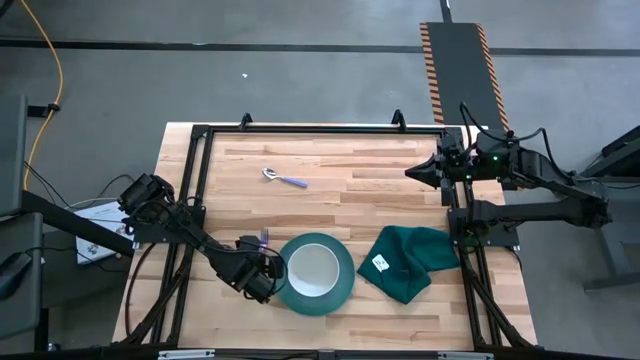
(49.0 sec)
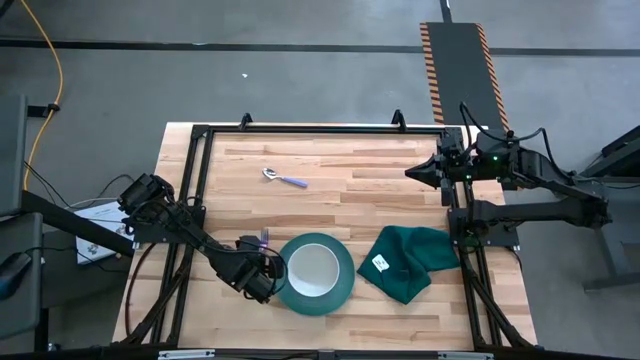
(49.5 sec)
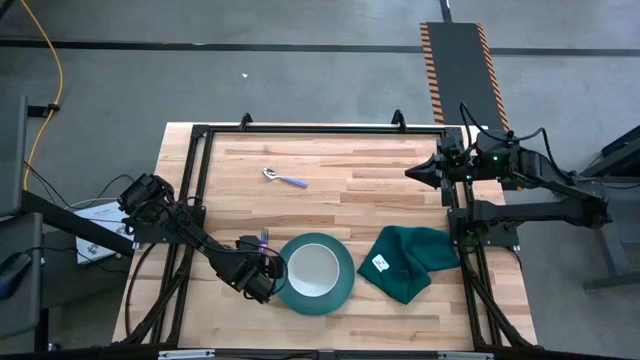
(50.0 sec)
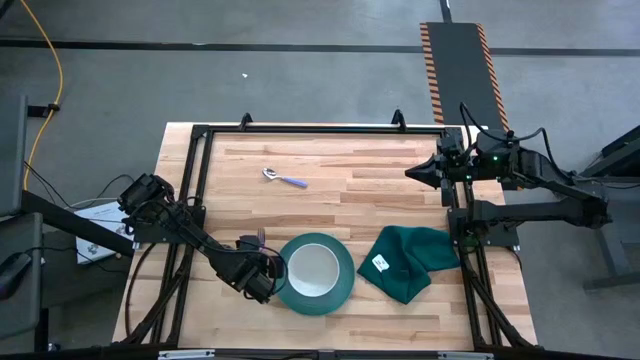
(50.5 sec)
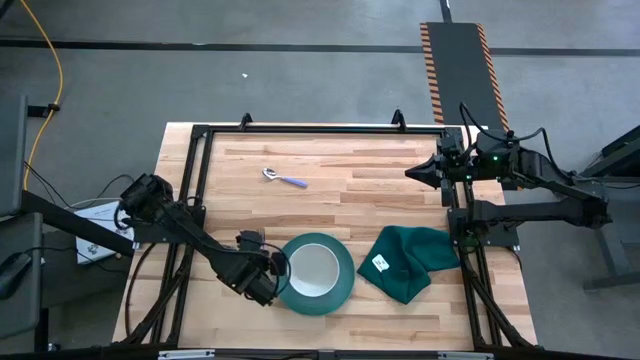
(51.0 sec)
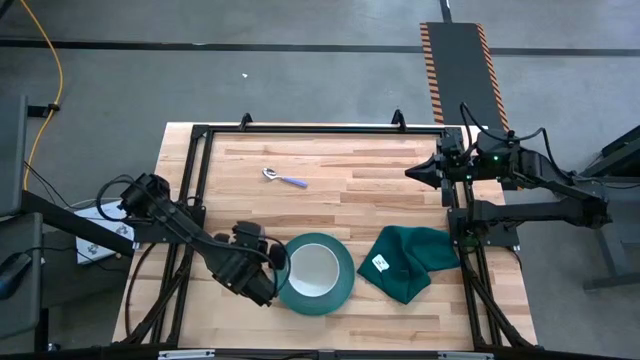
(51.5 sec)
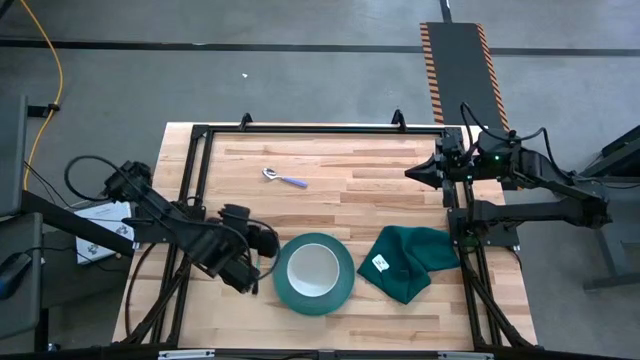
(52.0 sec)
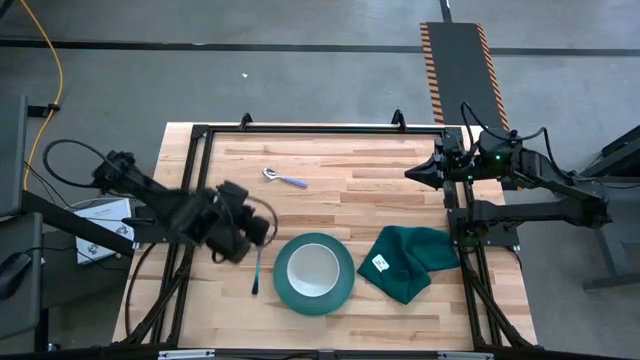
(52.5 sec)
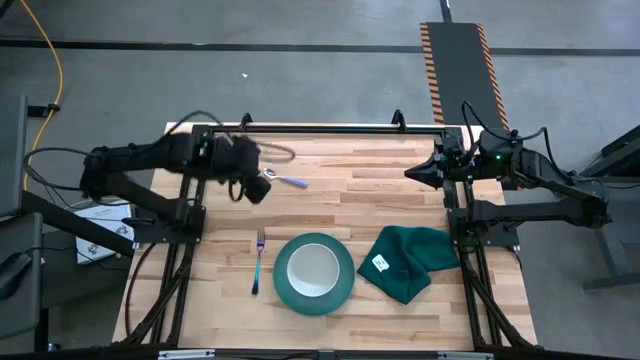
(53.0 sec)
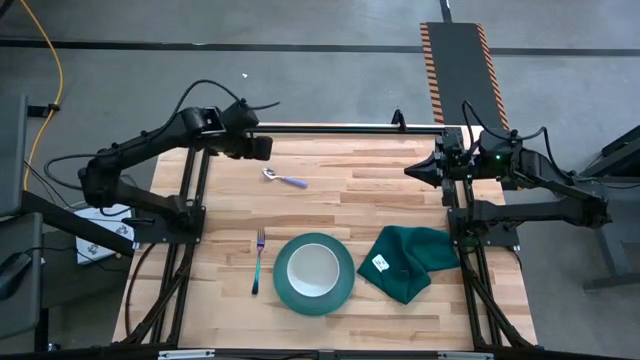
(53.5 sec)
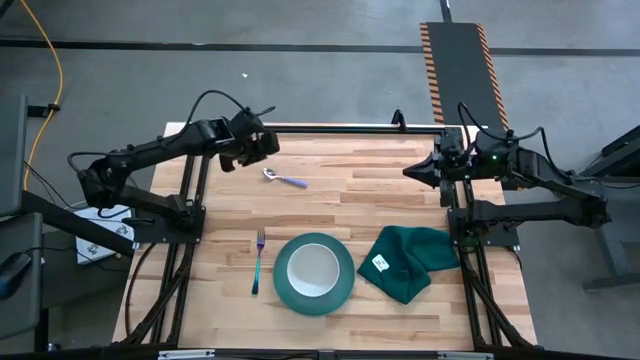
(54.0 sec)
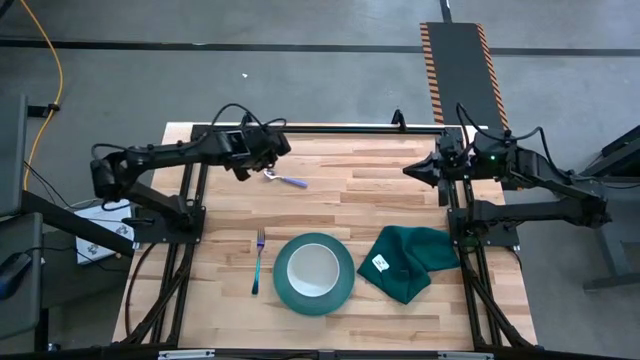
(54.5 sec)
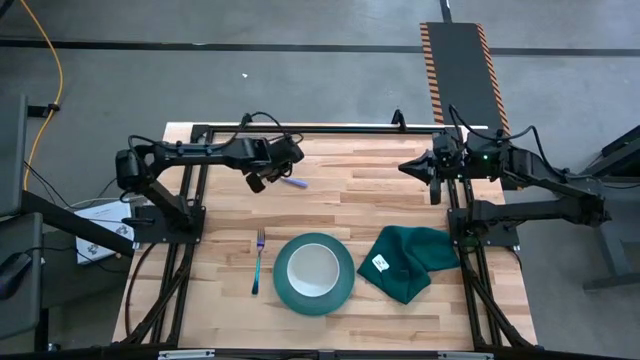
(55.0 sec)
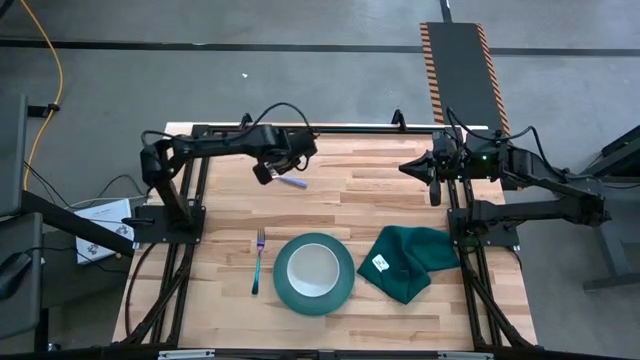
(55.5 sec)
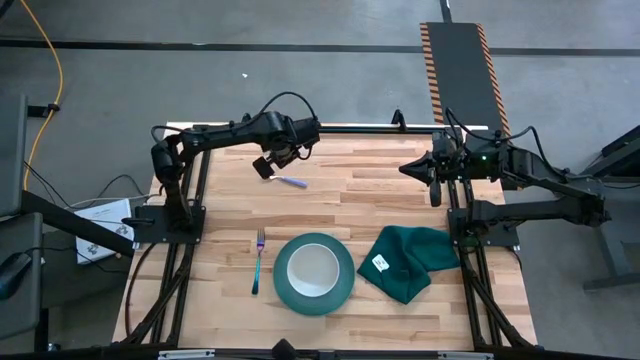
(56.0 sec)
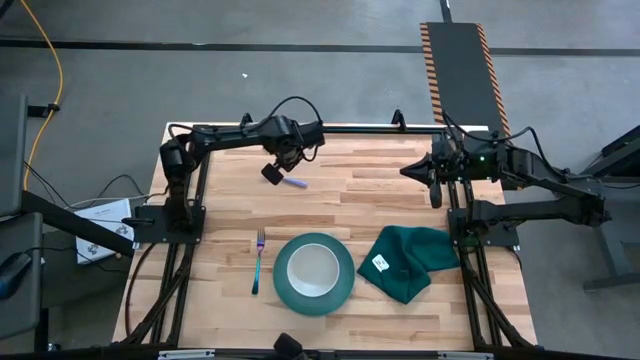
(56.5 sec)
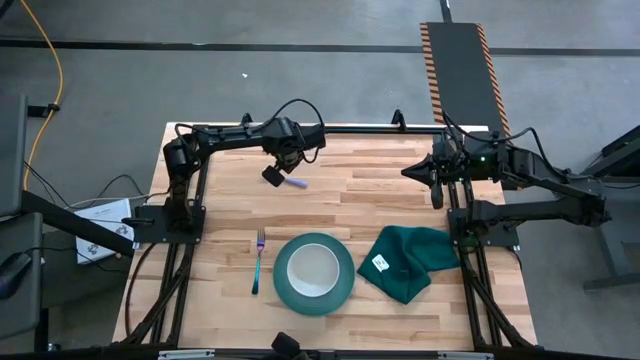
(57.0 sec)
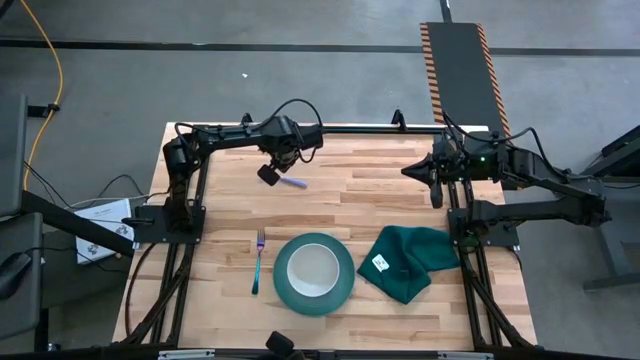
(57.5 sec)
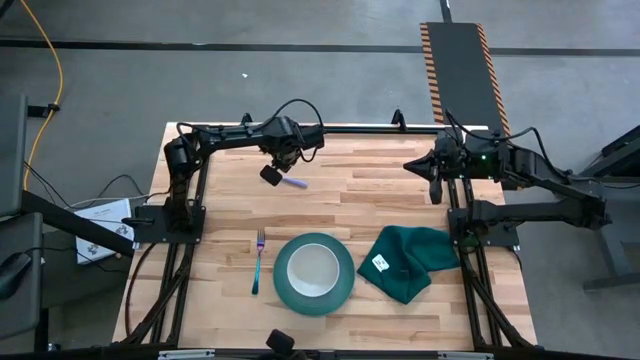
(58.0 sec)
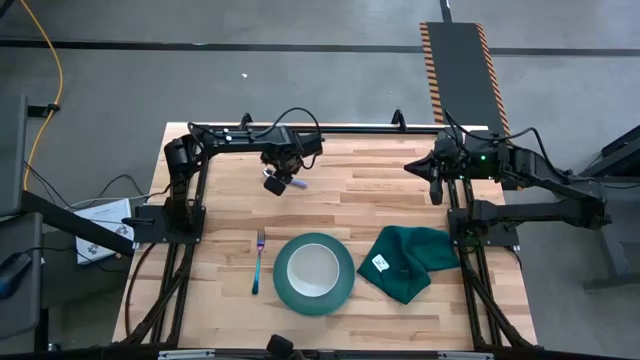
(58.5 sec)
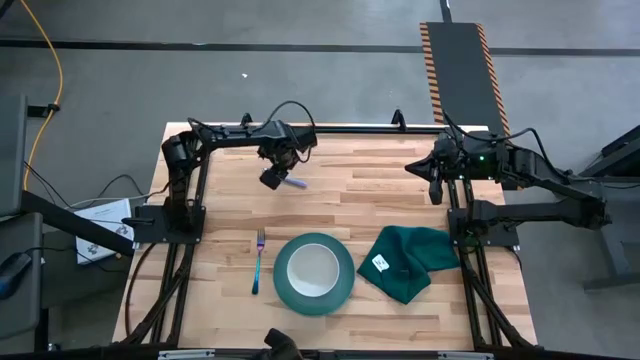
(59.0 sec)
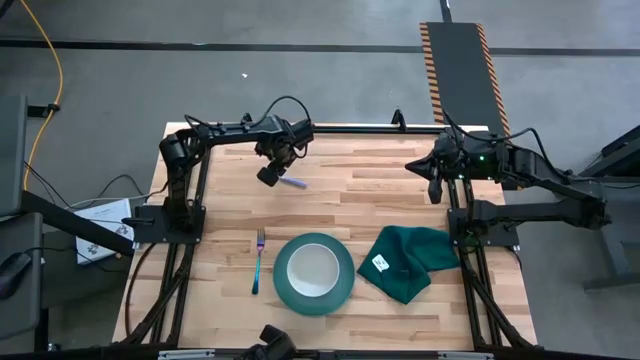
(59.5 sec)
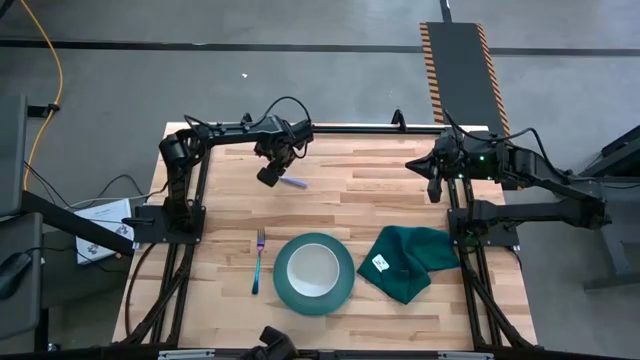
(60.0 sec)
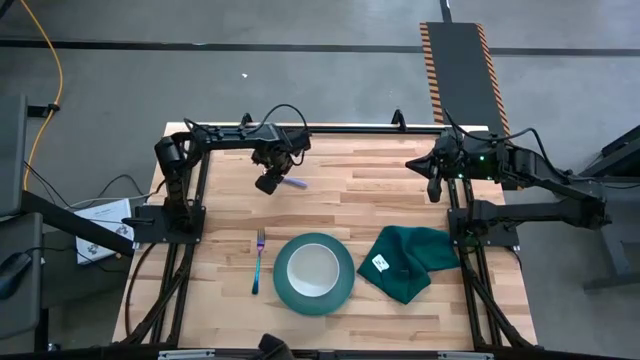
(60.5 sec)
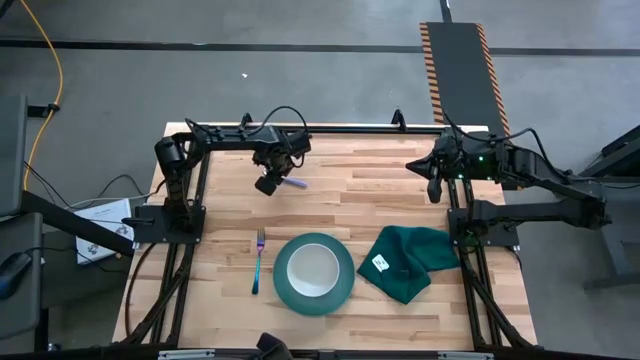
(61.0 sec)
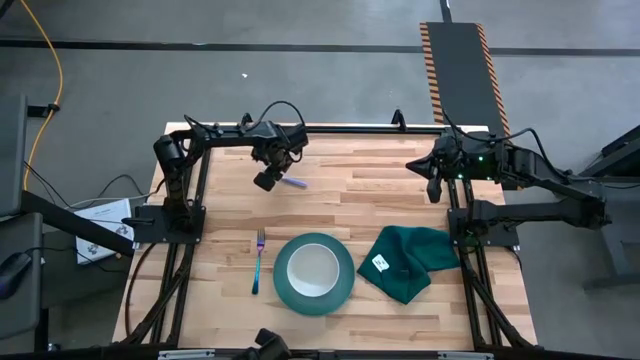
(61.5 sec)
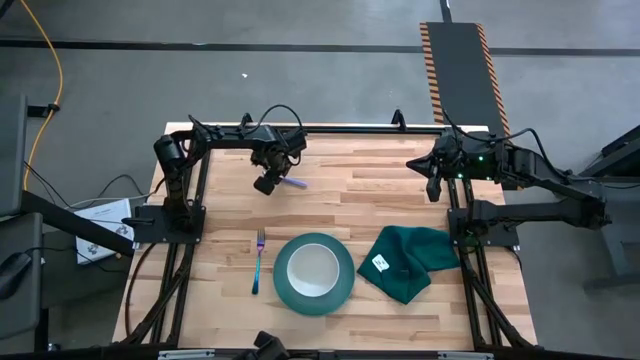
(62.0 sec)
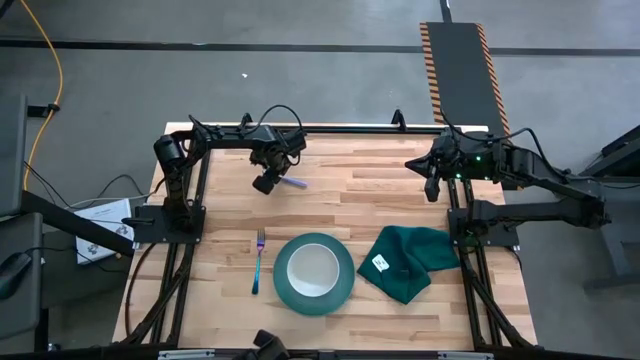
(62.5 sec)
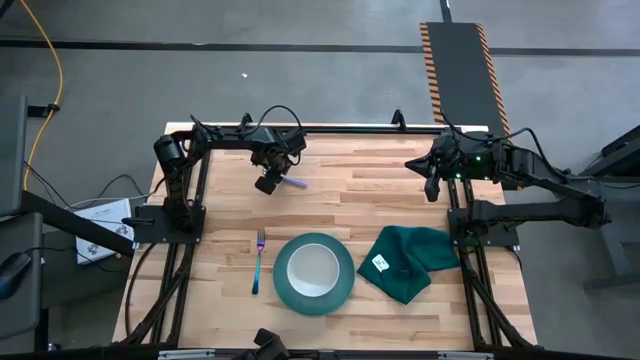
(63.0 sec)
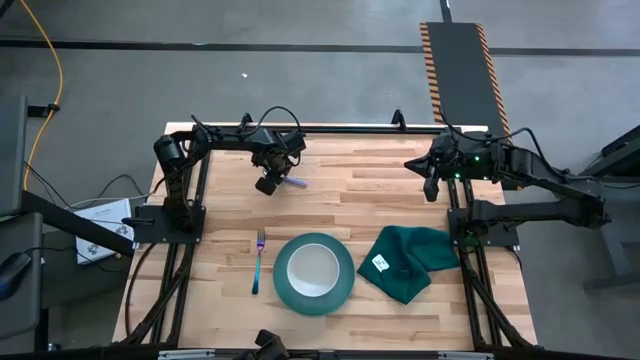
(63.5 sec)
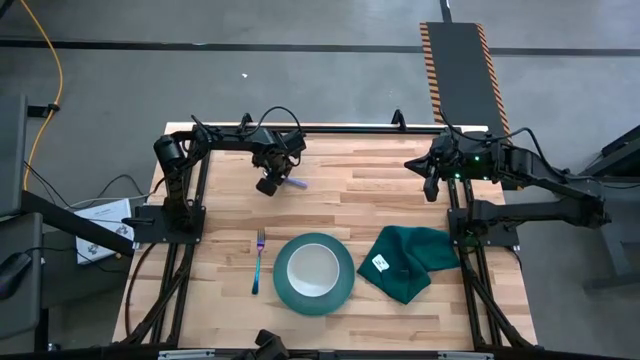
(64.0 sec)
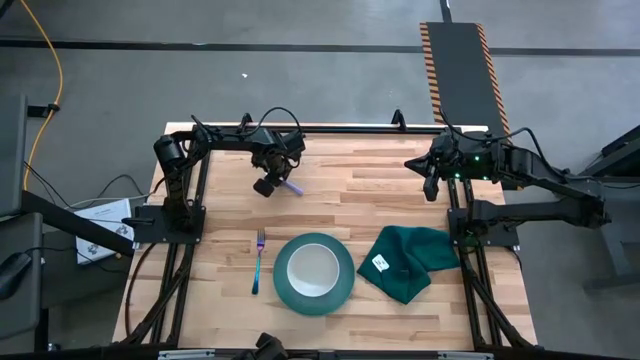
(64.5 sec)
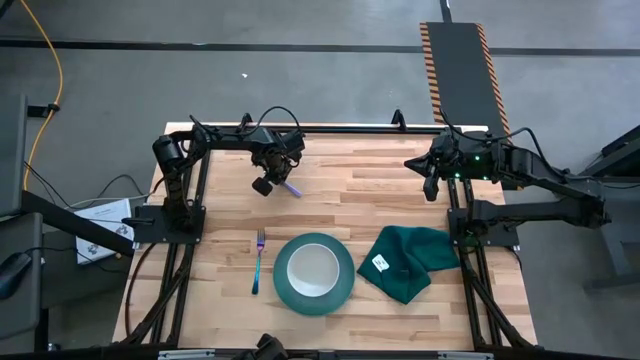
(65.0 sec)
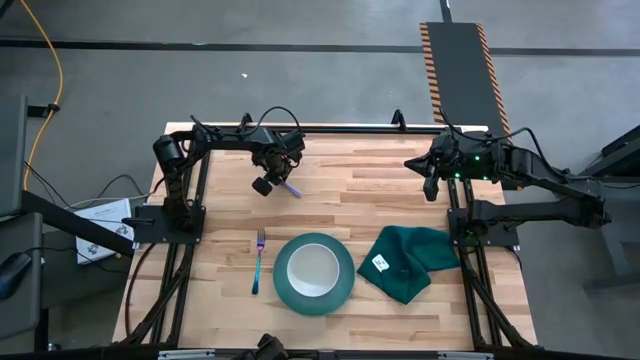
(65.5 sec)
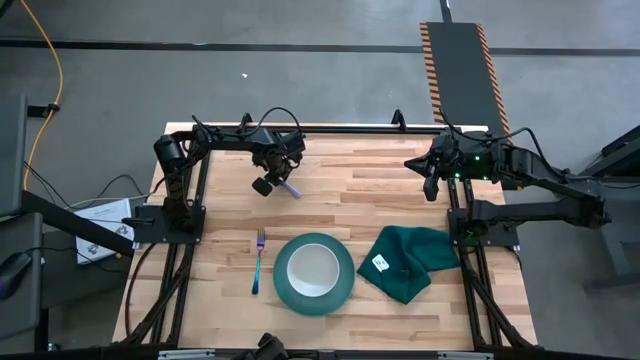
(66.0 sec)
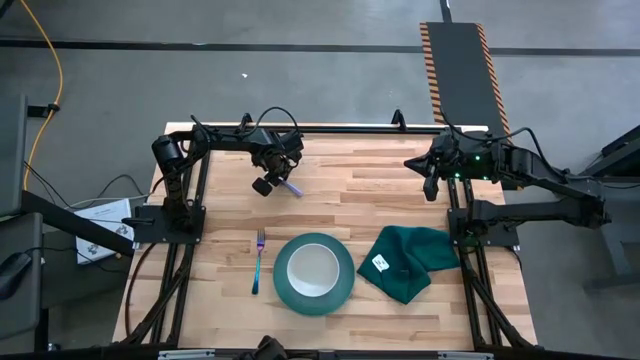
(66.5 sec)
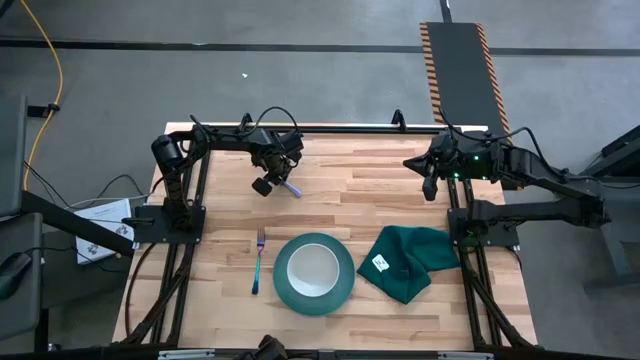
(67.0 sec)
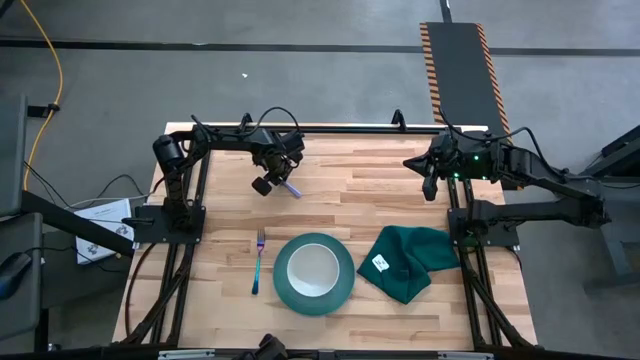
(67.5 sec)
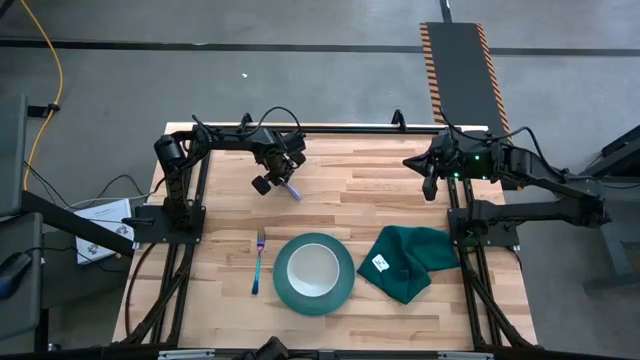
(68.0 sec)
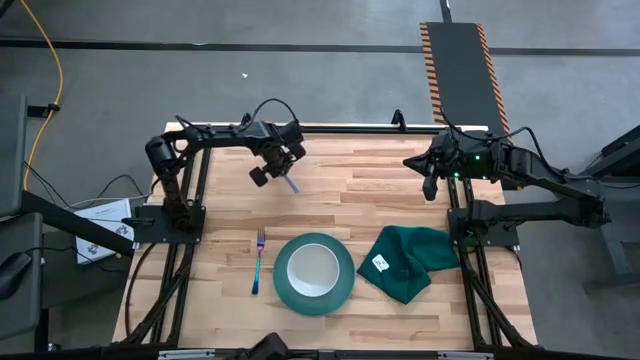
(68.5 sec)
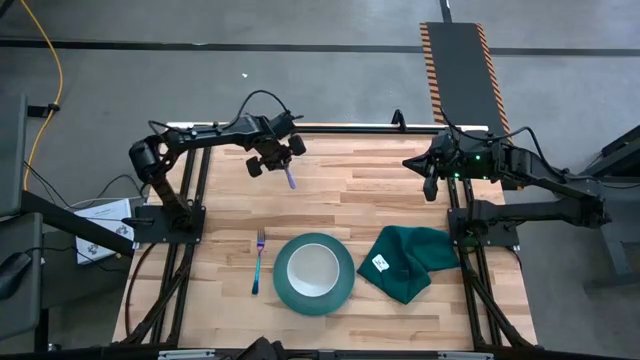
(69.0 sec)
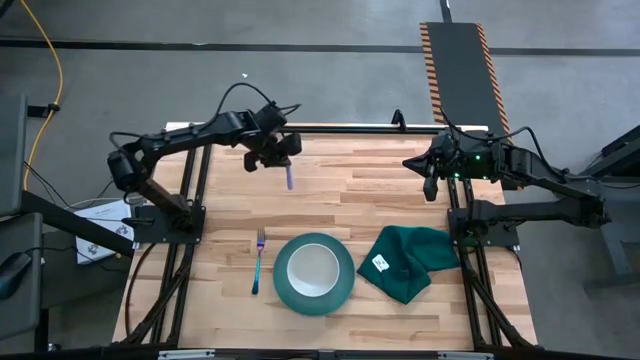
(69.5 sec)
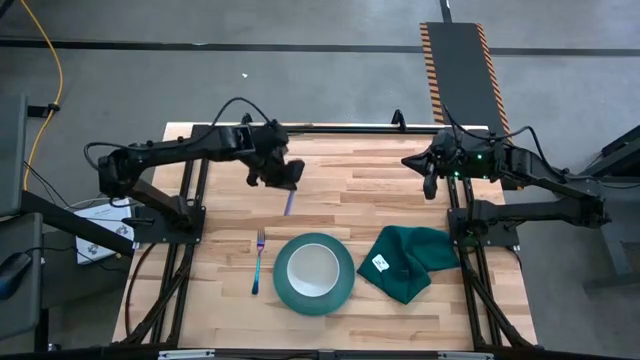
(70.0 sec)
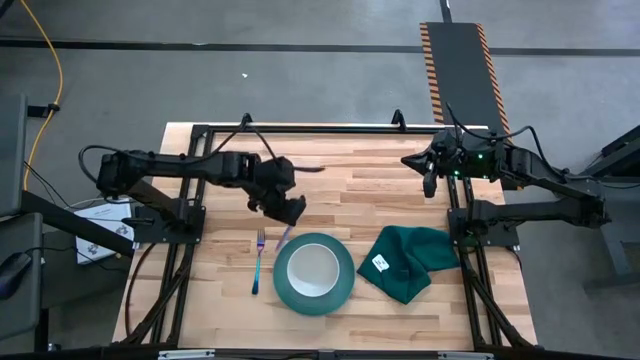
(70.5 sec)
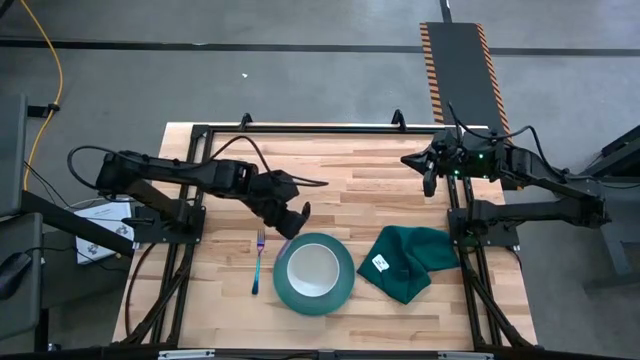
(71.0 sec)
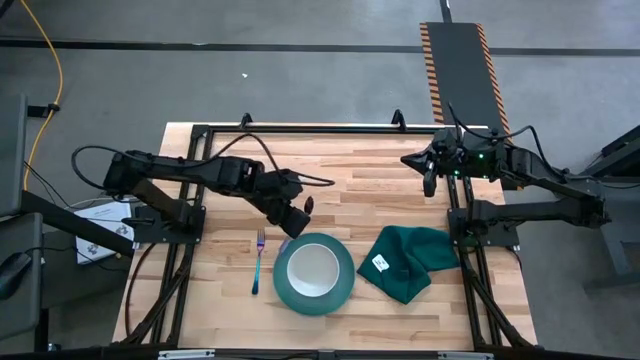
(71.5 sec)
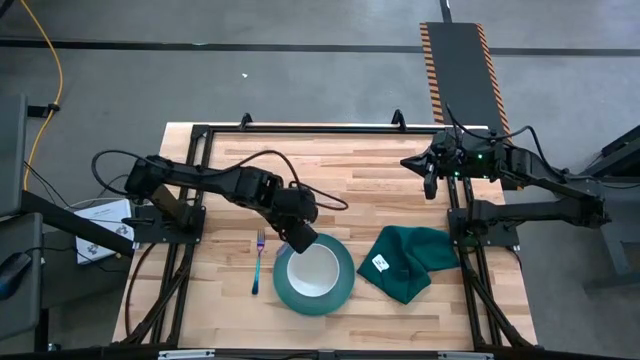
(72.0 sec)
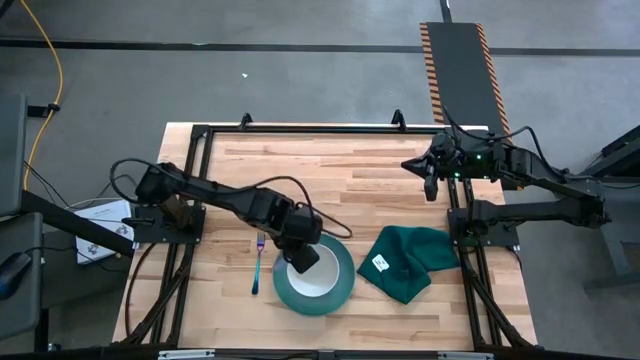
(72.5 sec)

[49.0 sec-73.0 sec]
Task: Set table place
Place the purple fork inside the white bowl
